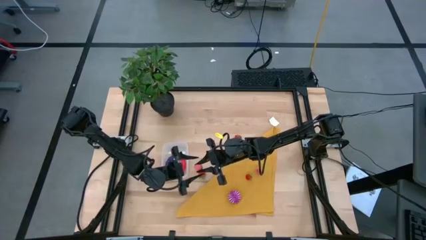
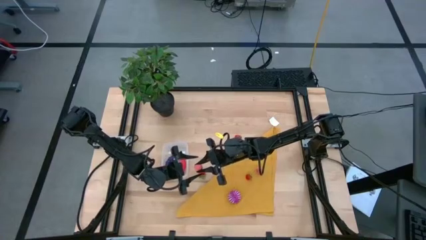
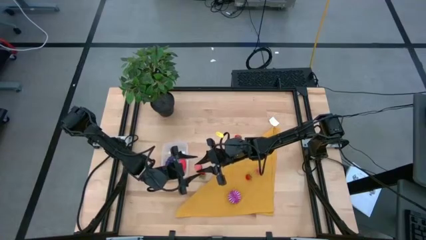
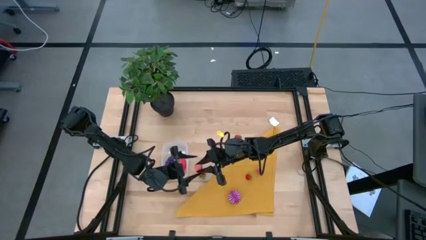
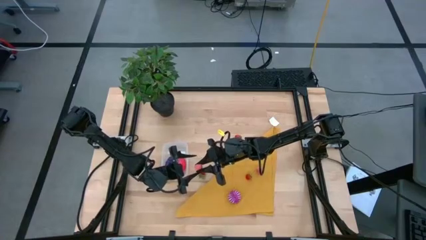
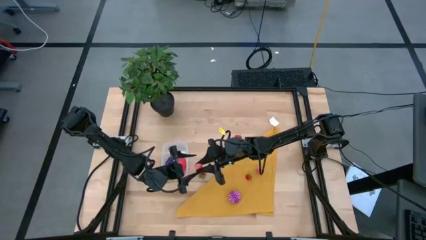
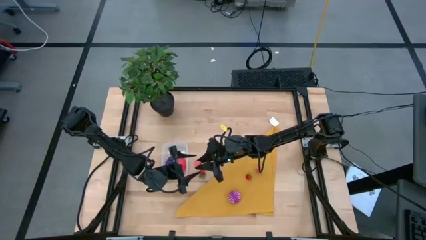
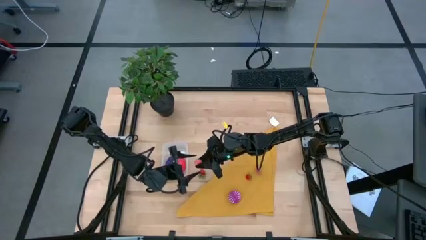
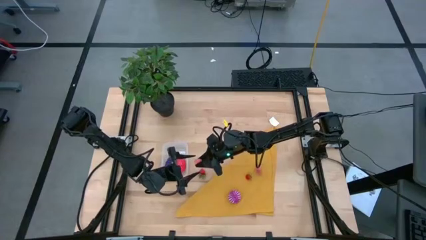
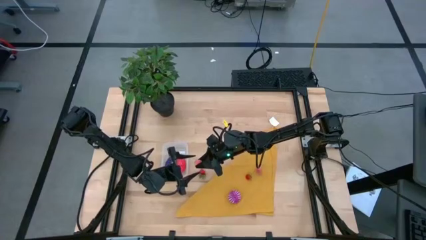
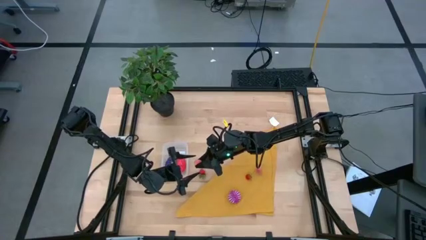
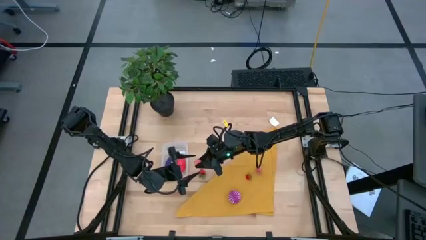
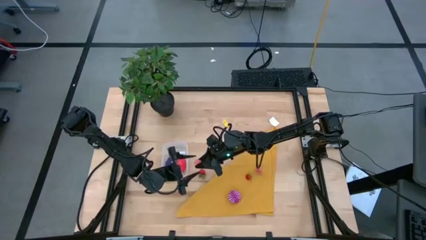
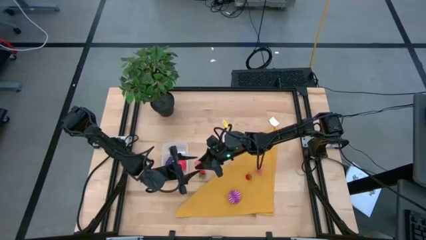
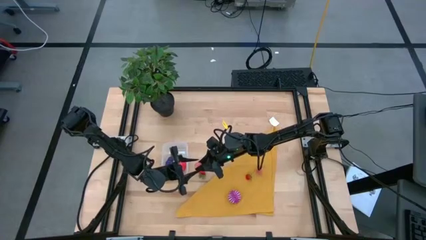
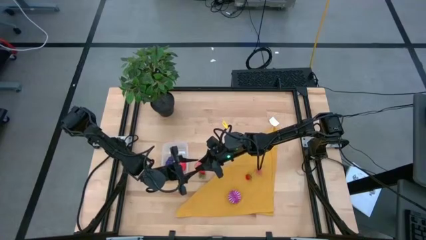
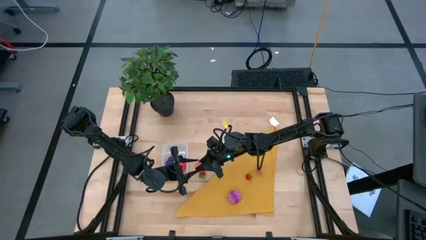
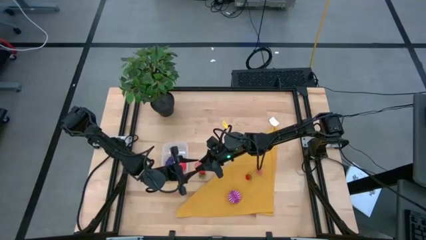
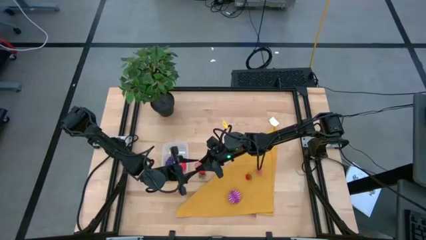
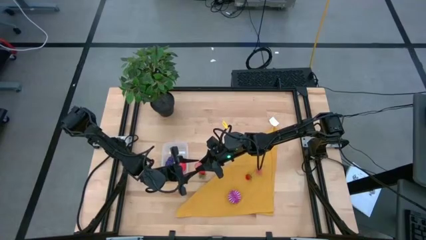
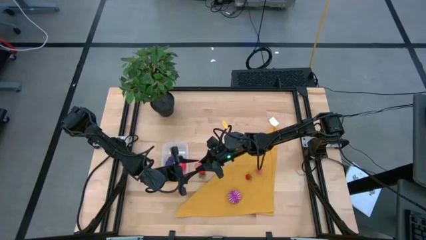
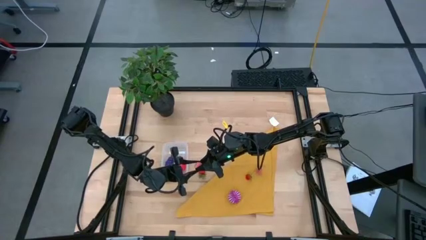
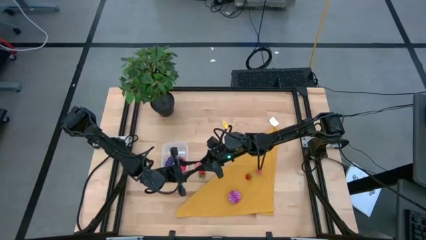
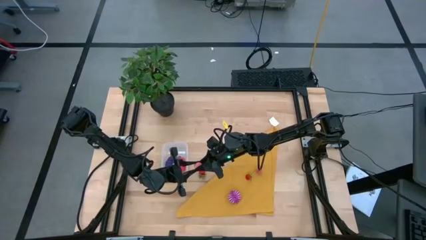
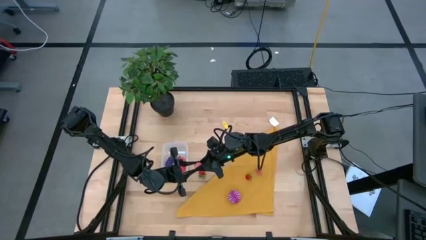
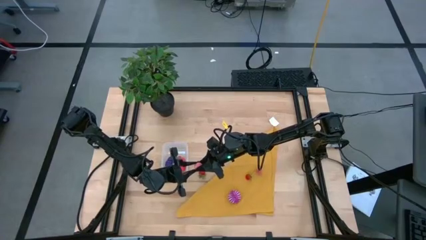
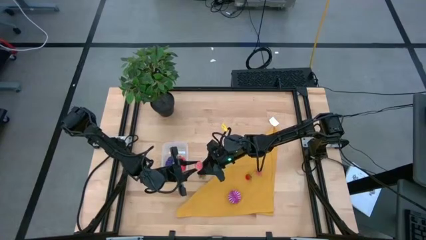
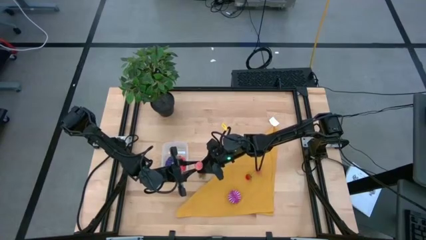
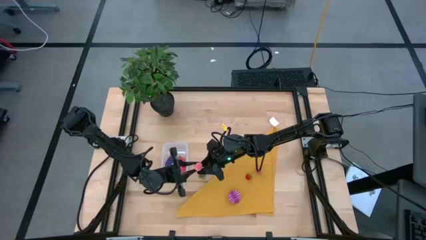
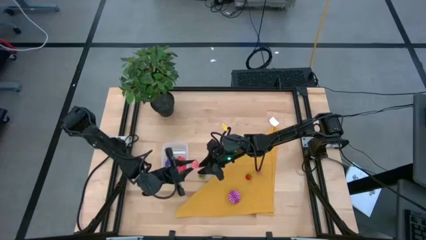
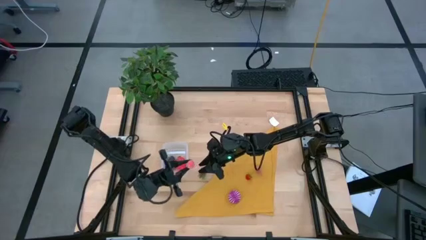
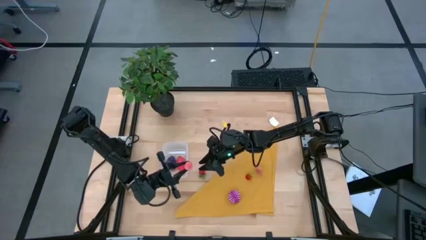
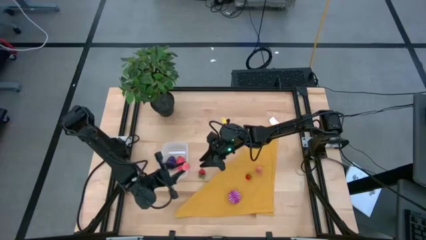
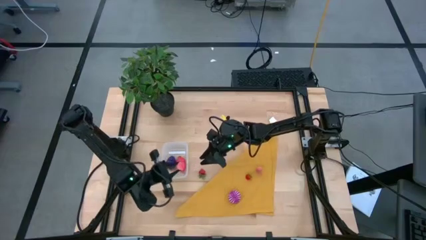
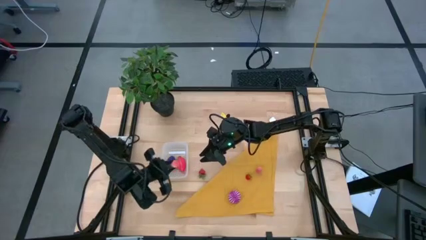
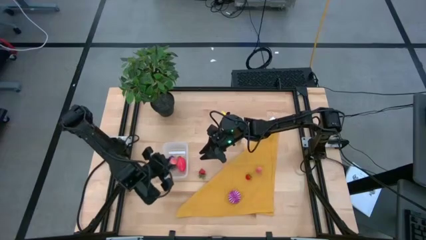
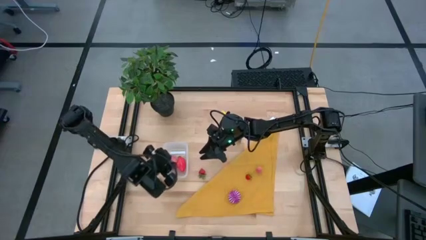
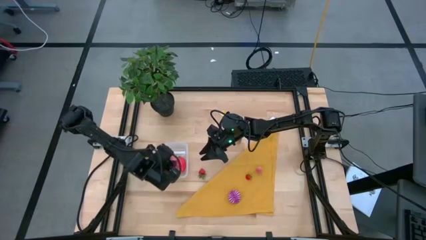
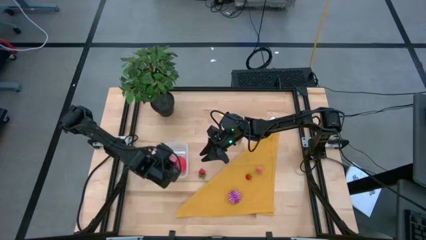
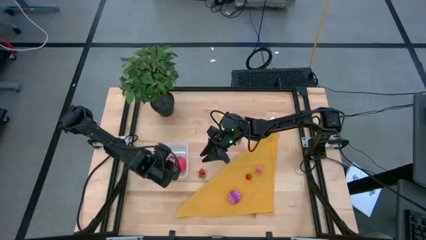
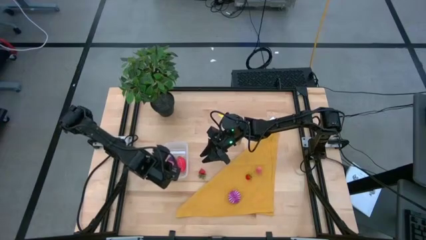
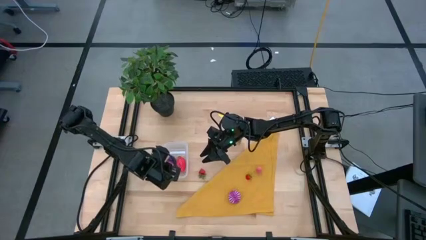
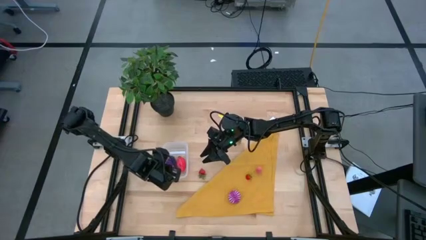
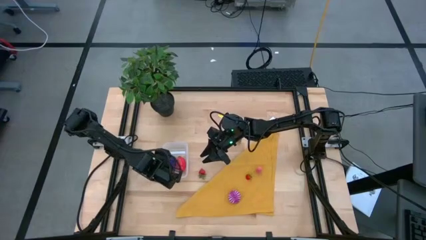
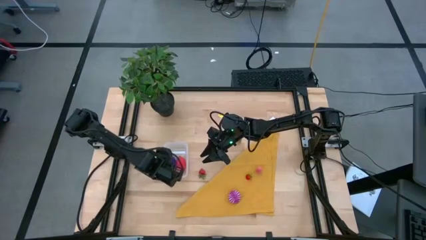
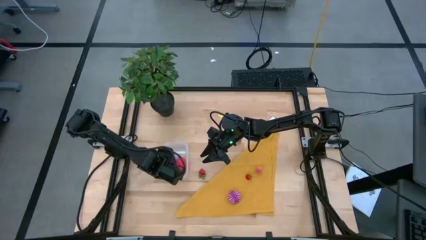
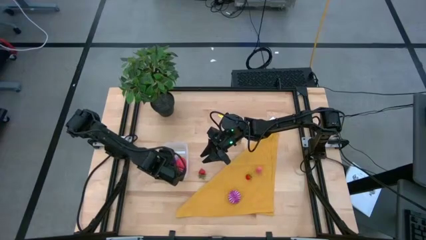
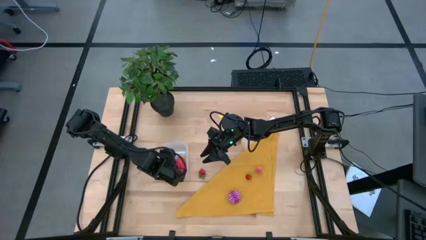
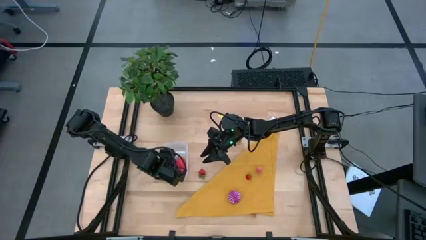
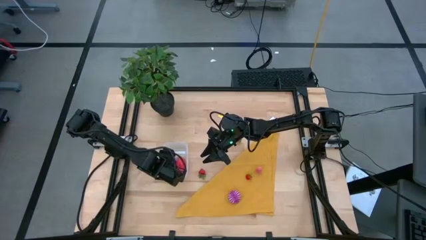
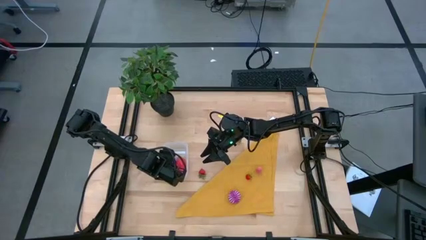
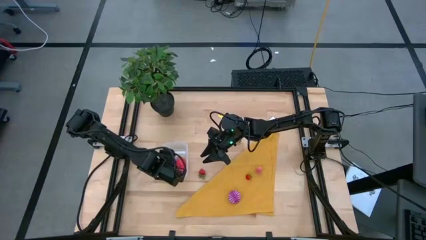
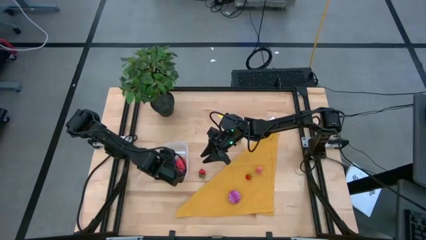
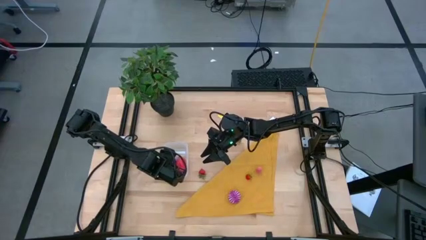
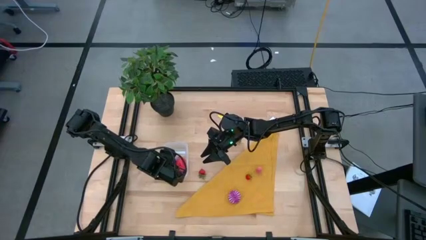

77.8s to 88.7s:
Task: Pick and placing Produce into tupperware
Put the top pink peach into the transparent bin
